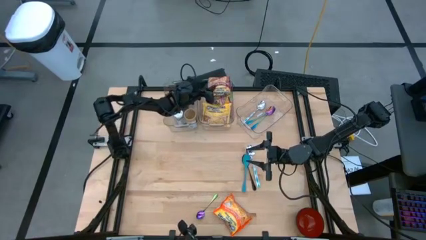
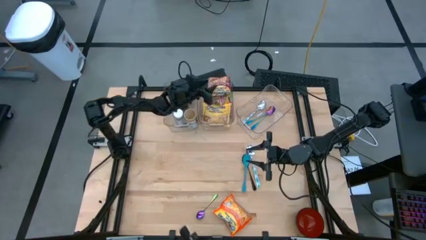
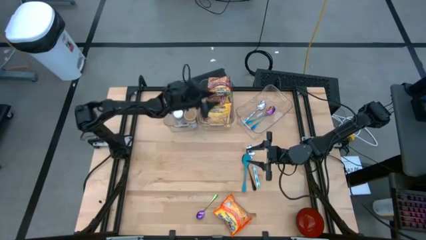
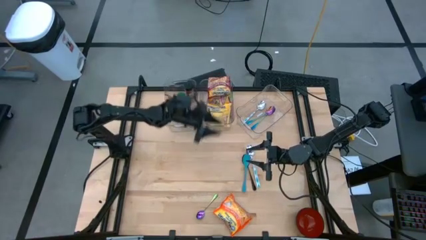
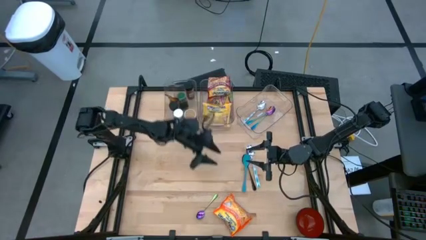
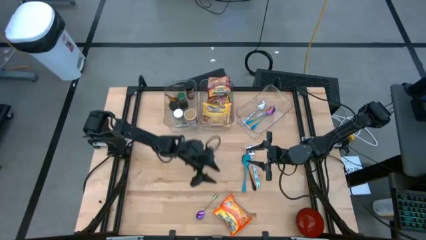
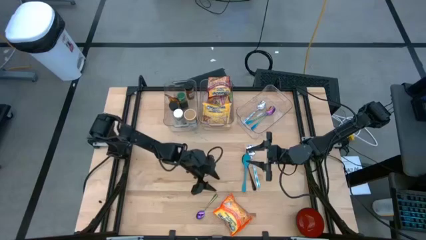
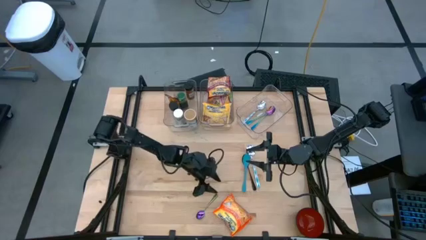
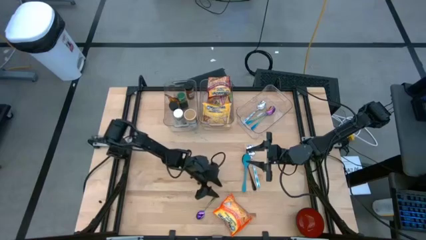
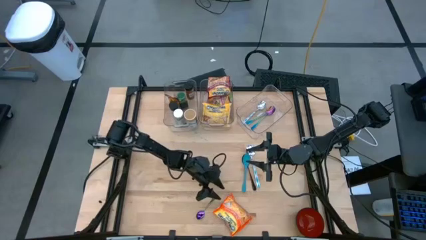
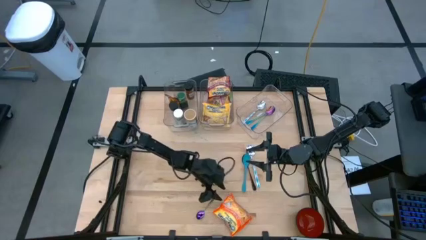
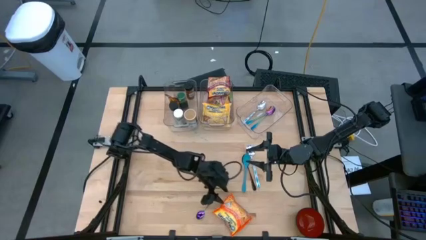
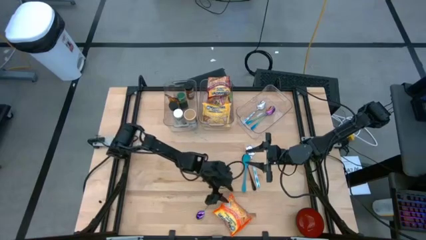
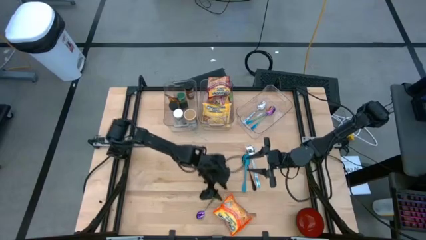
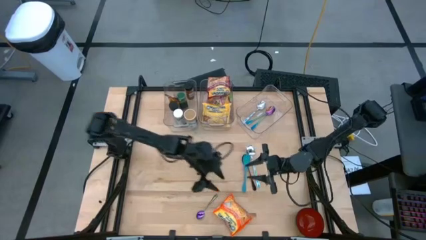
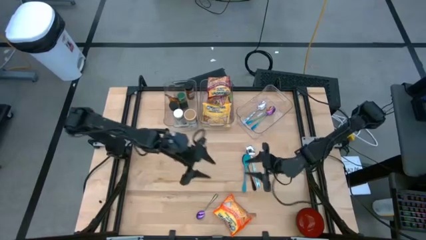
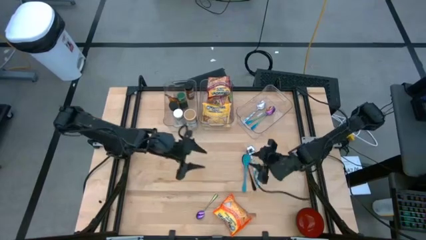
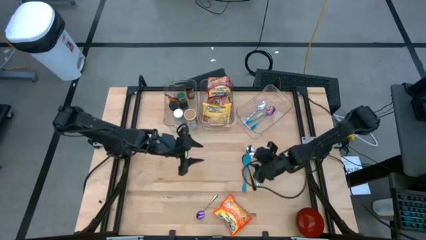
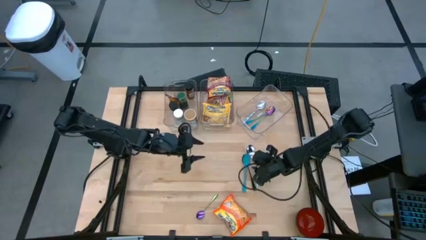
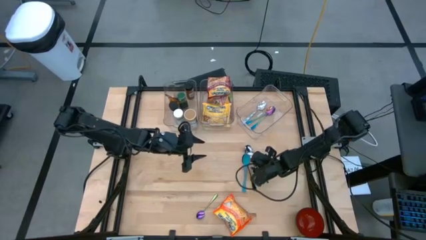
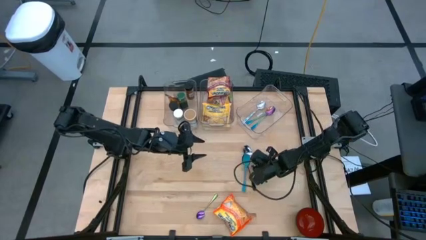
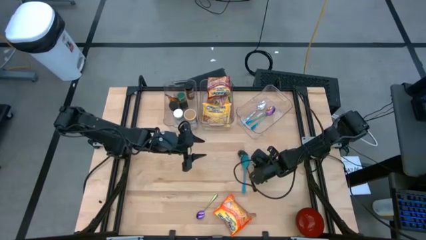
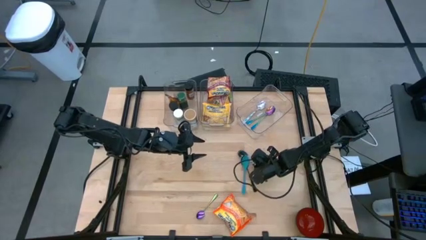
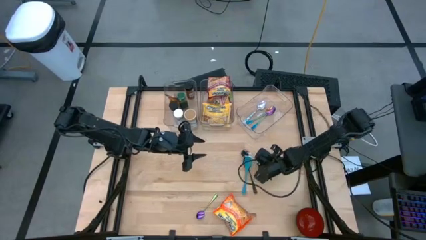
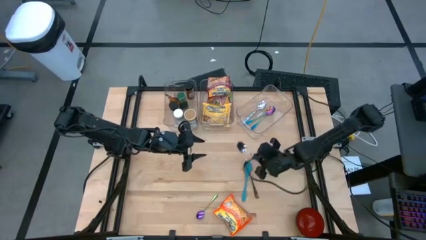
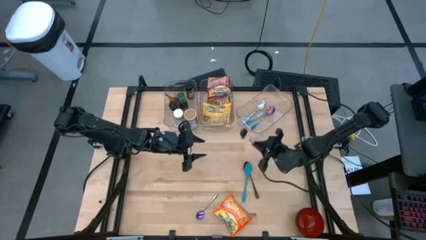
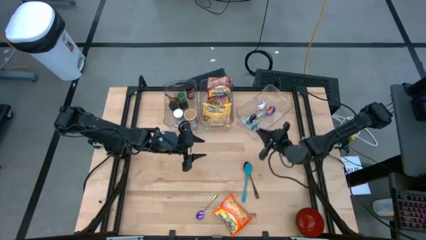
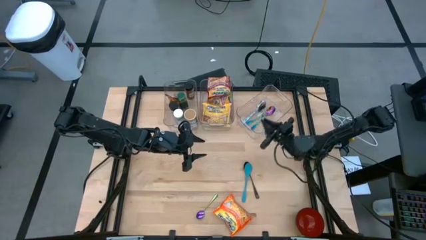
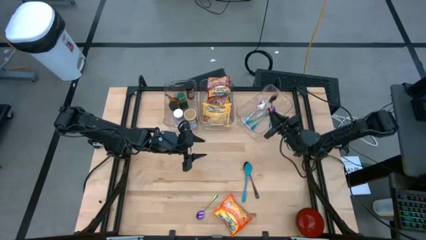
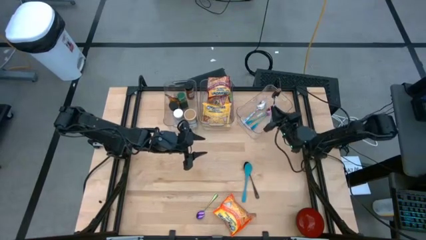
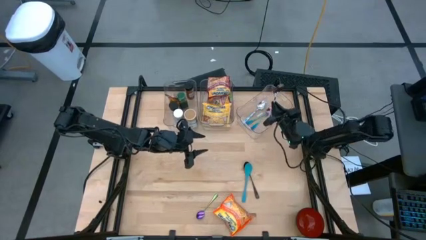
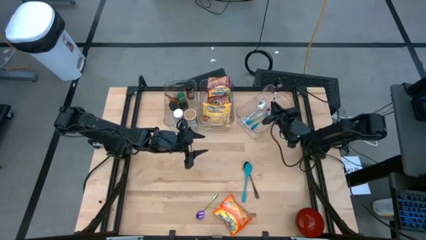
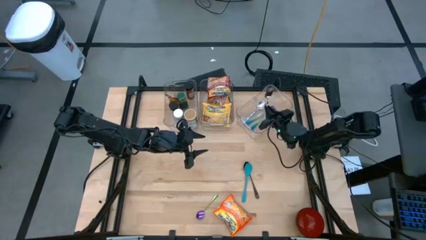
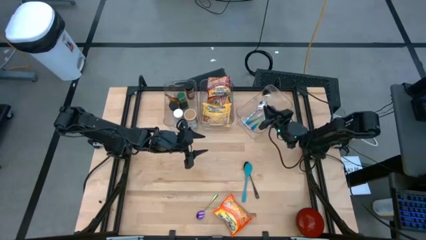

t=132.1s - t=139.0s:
Task: Pick & Place Food Item
Put the white patterned spoon into the right transparent bin

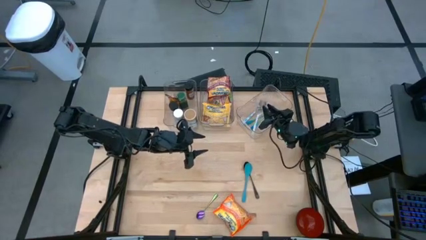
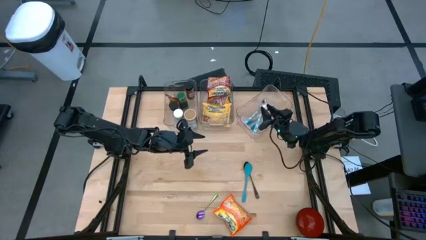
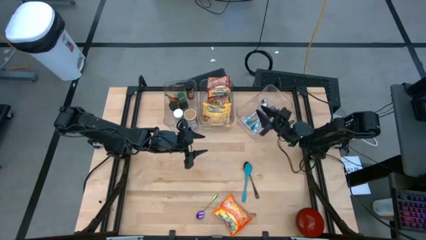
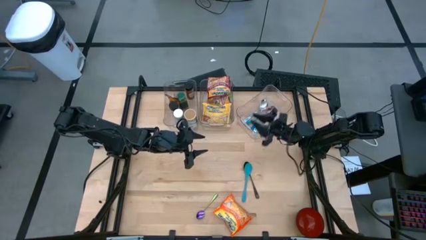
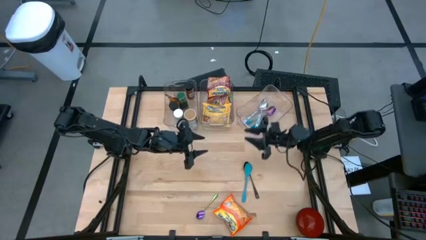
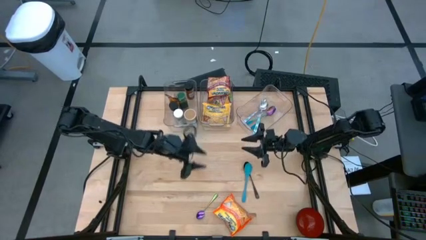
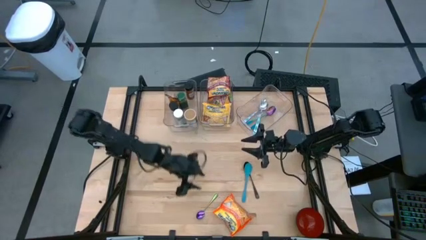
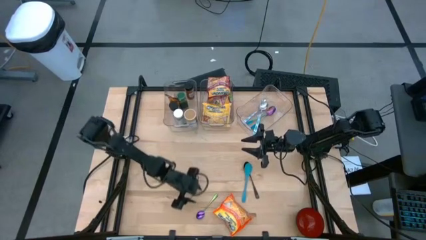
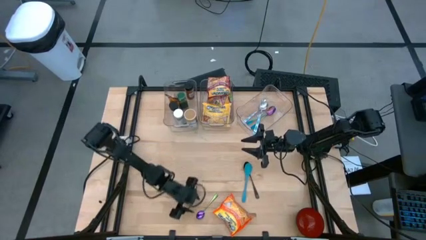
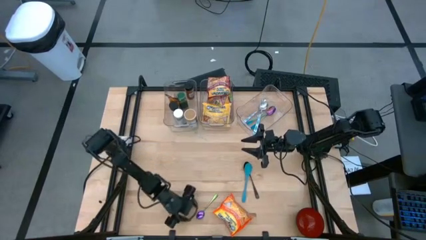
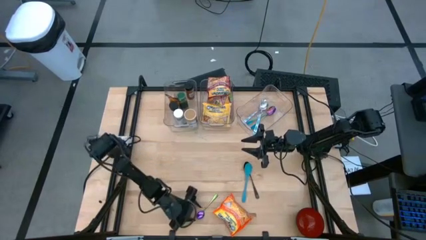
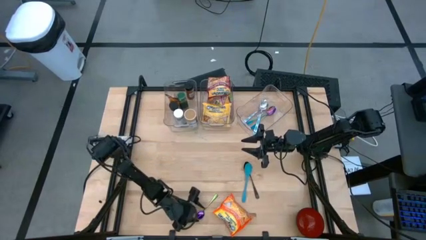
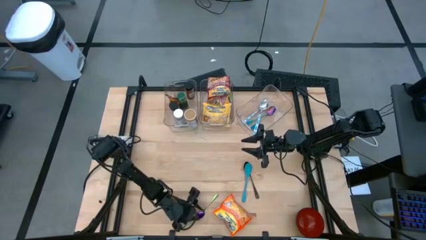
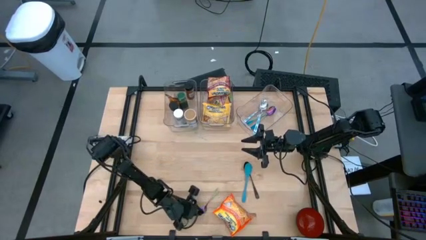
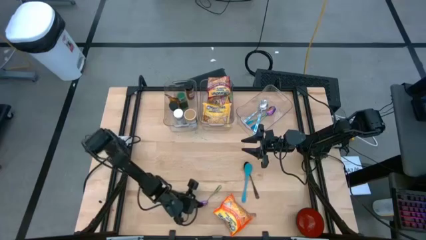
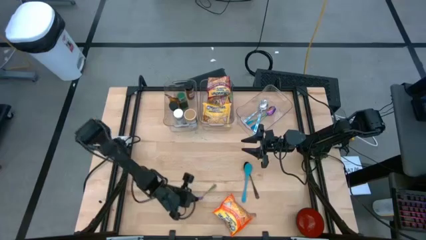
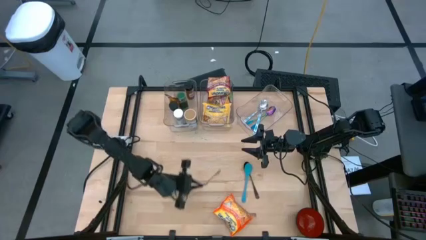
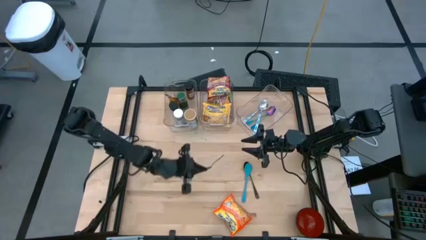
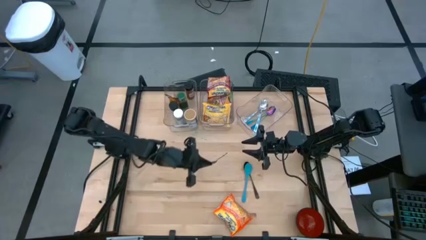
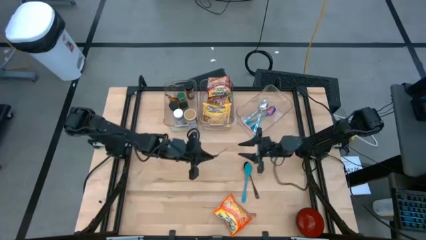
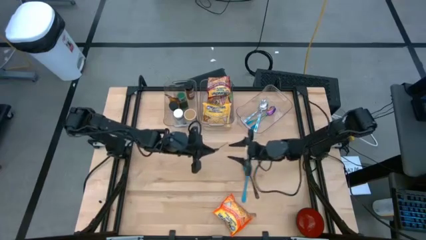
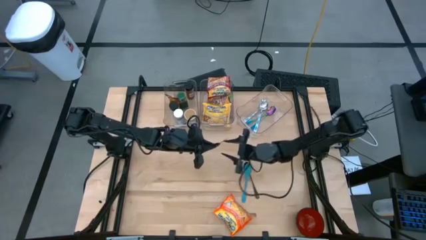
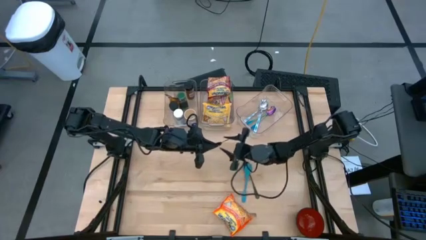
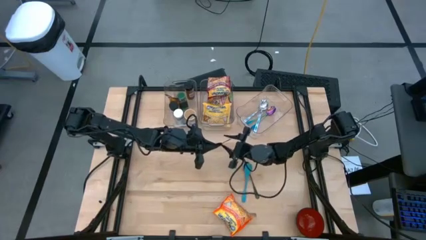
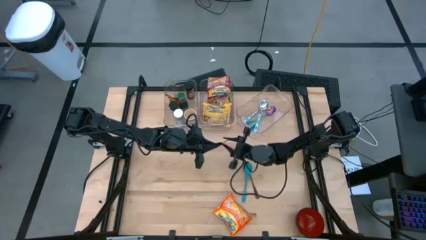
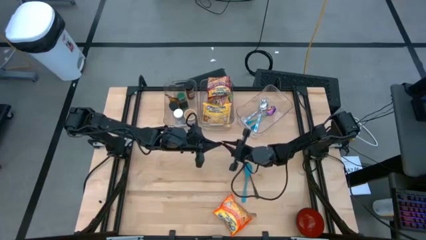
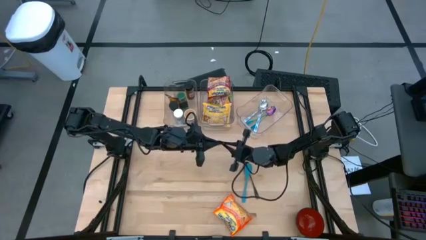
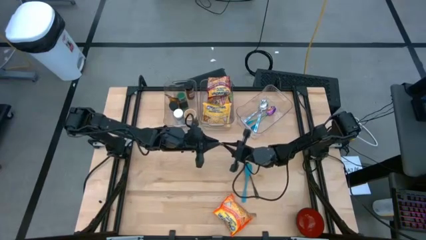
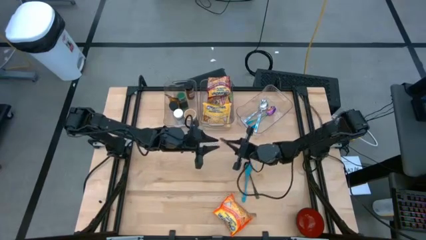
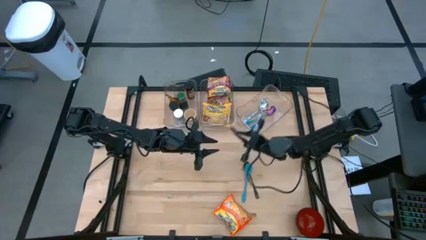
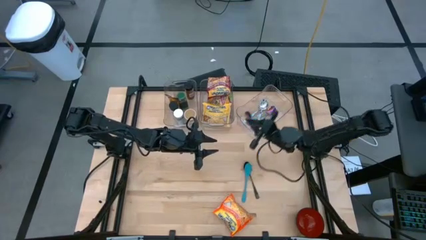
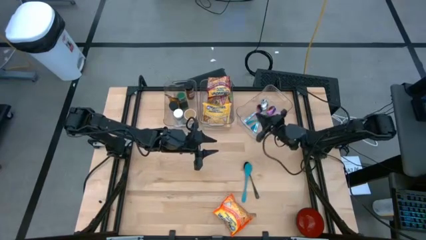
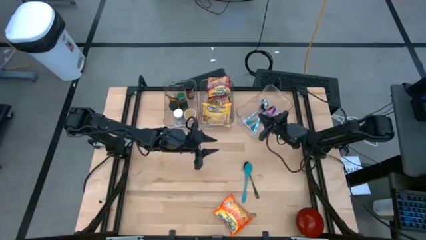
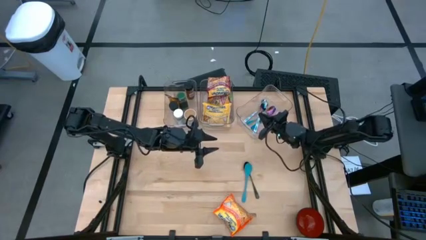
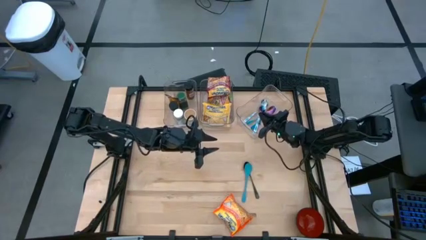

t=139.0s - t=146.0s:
Put the blue spoon into the right transparent bin

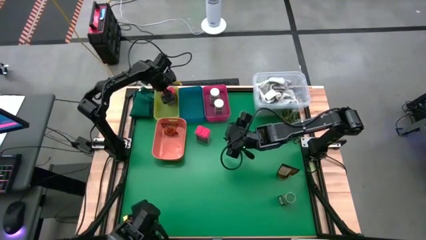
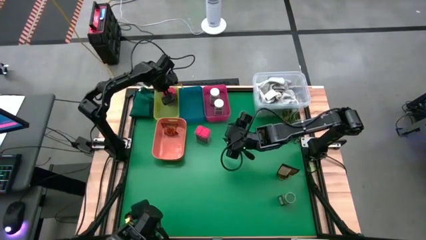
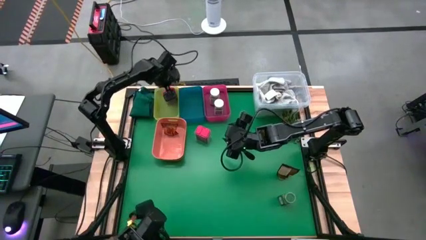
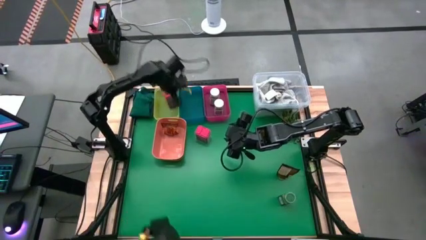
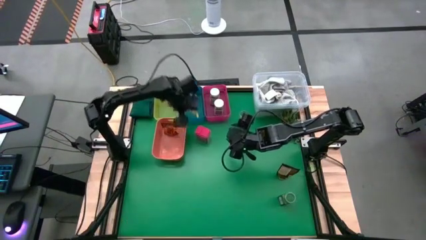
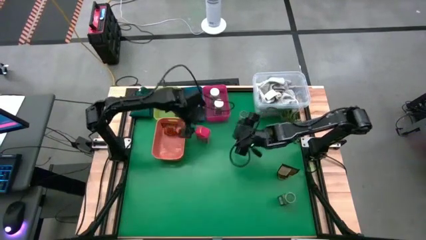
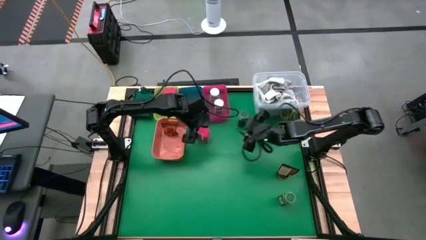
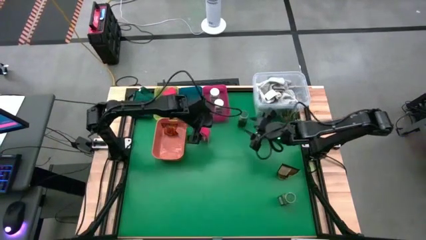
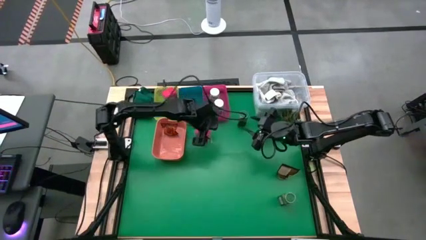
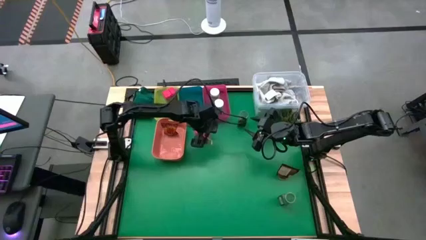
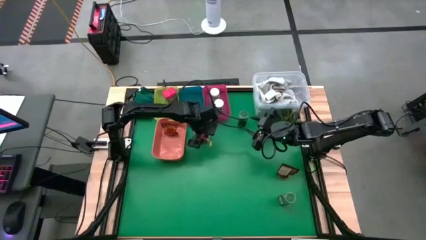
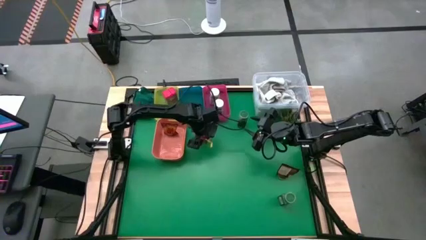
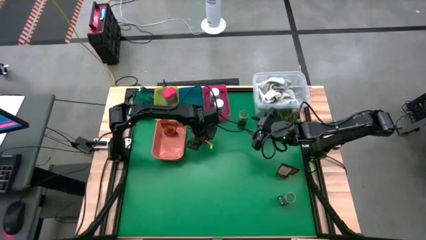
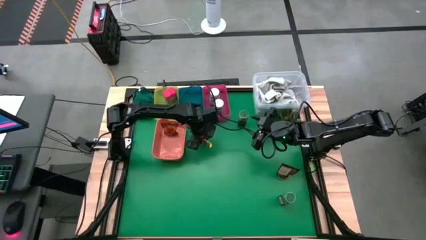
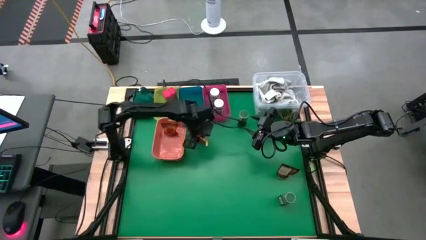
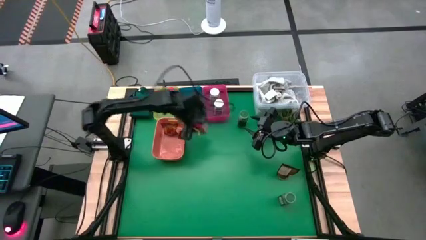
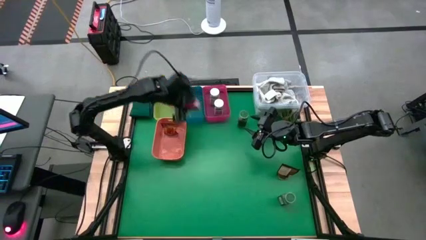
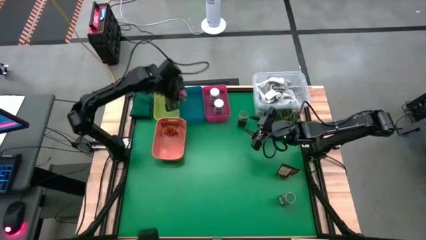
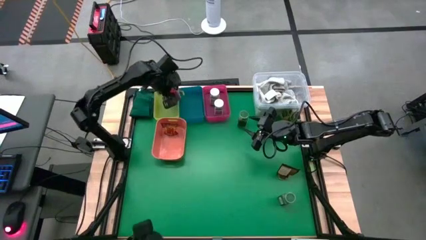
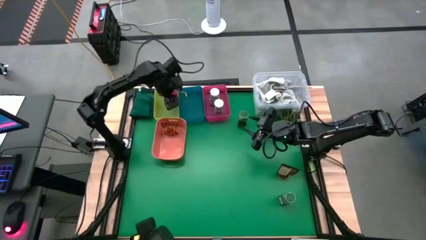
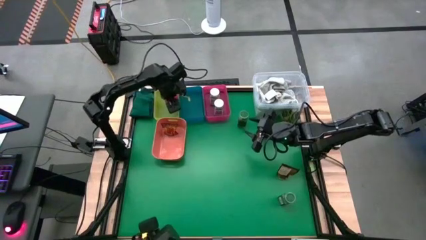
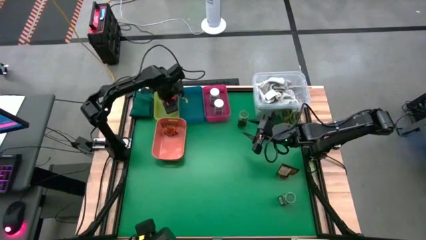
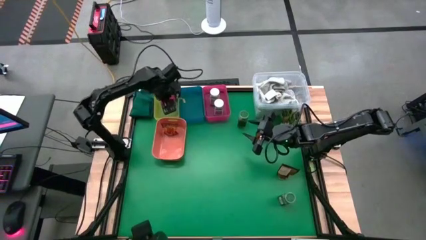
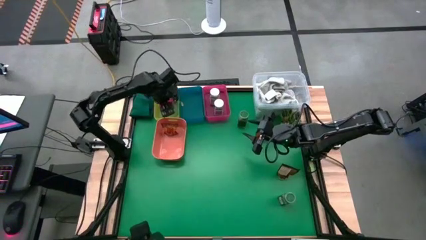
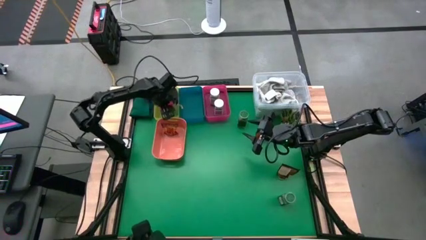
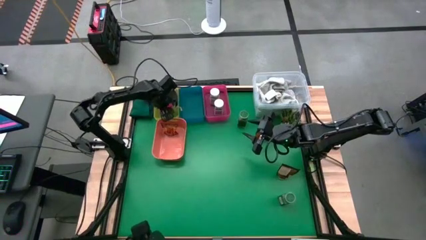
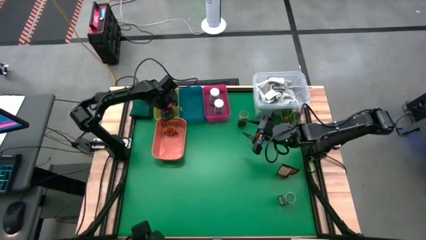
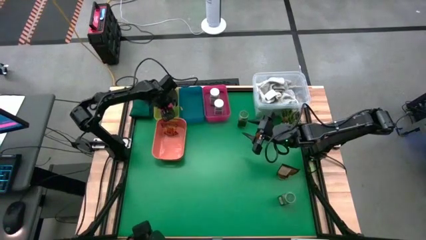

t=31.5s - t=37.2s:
Task: Sort spices by type
Put the red seasoning can into the yellow bin
